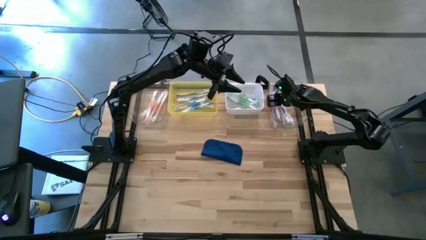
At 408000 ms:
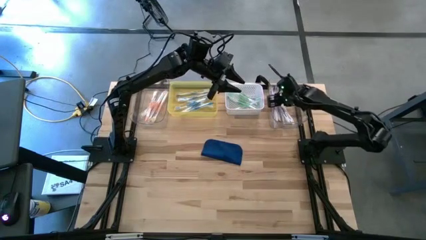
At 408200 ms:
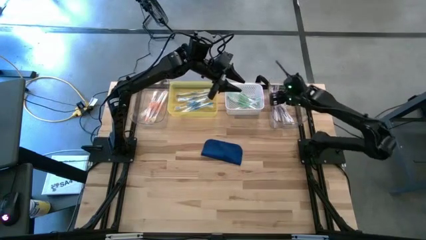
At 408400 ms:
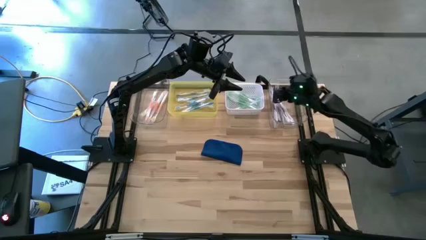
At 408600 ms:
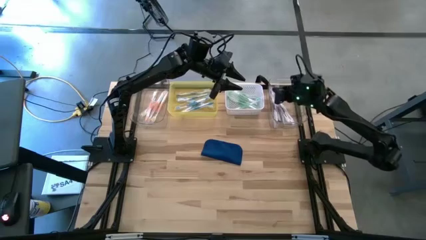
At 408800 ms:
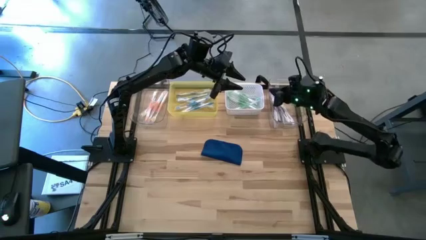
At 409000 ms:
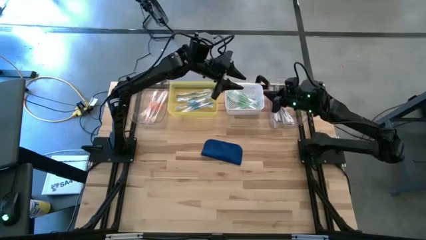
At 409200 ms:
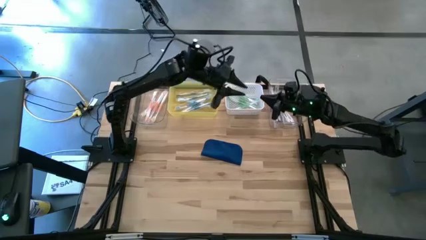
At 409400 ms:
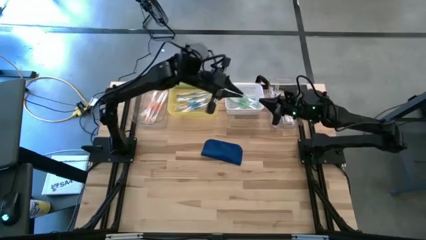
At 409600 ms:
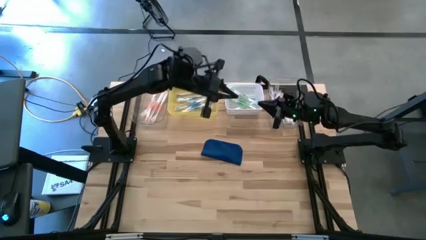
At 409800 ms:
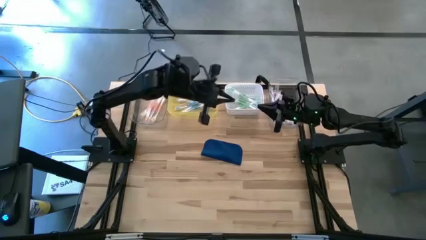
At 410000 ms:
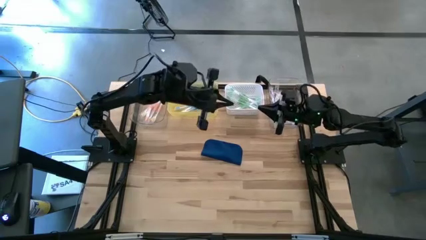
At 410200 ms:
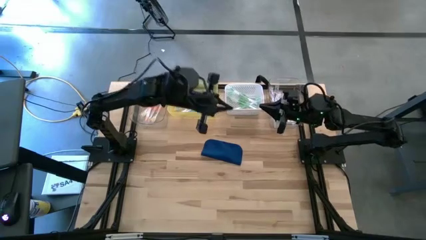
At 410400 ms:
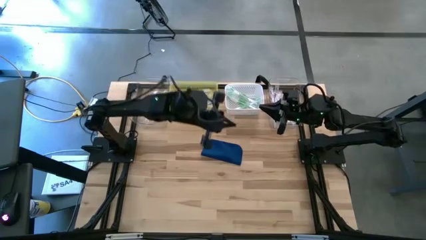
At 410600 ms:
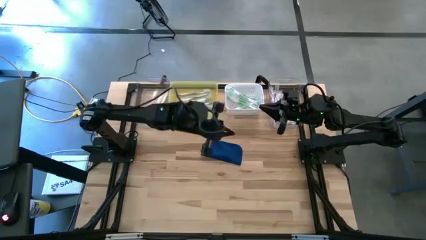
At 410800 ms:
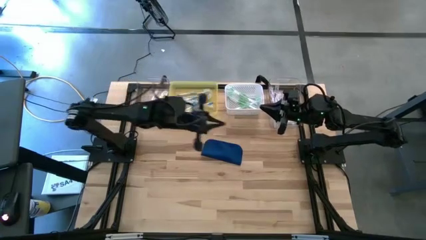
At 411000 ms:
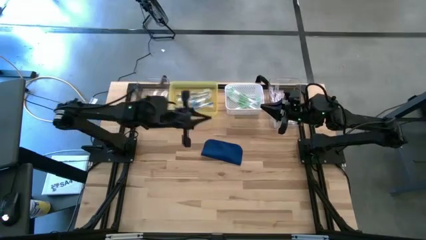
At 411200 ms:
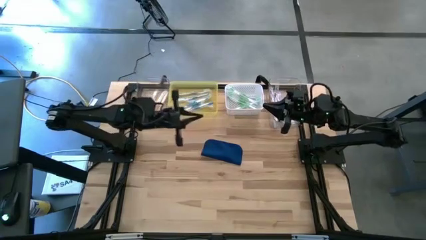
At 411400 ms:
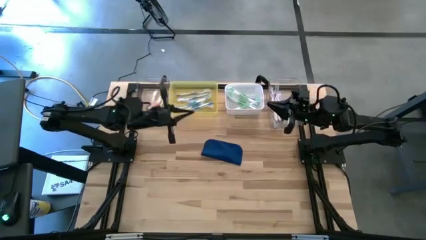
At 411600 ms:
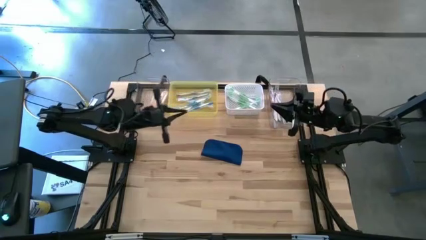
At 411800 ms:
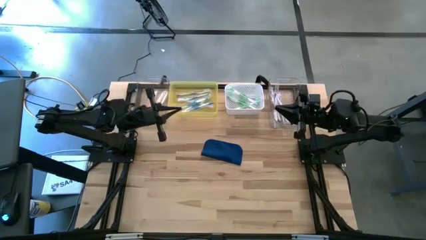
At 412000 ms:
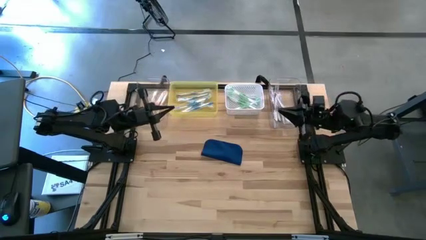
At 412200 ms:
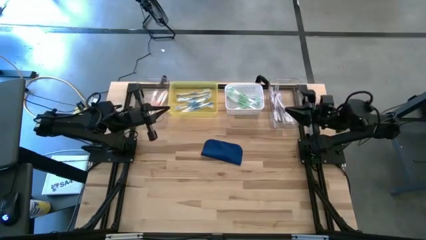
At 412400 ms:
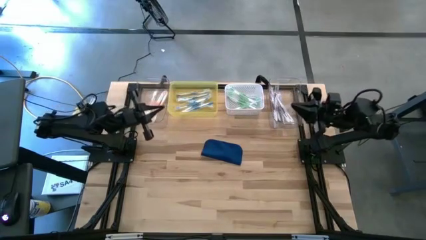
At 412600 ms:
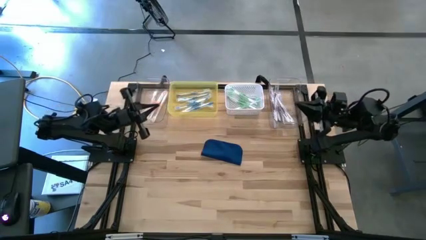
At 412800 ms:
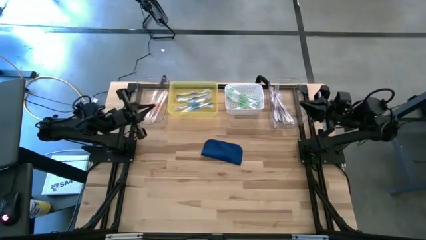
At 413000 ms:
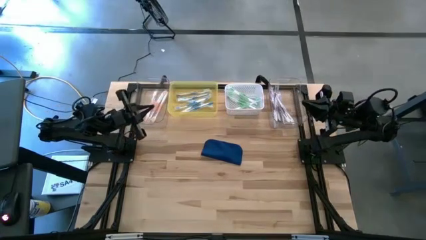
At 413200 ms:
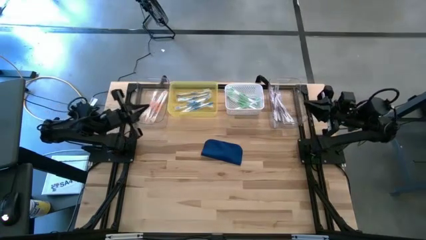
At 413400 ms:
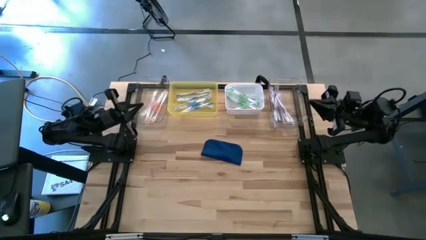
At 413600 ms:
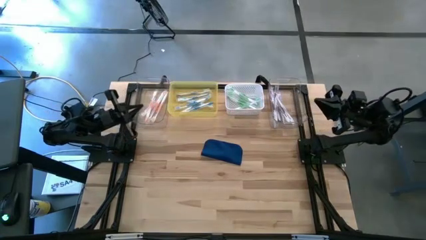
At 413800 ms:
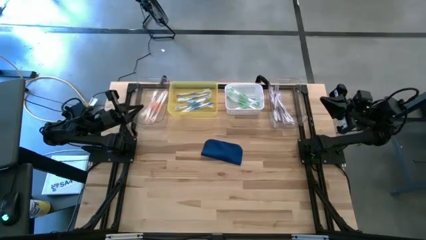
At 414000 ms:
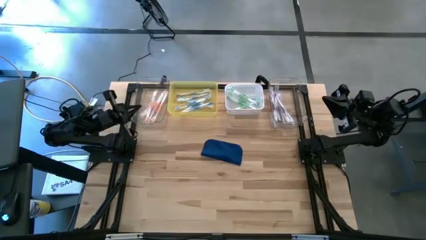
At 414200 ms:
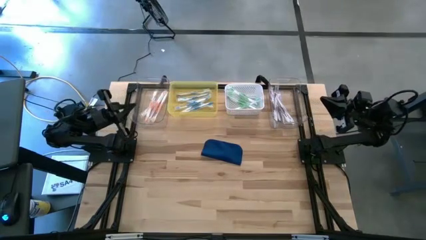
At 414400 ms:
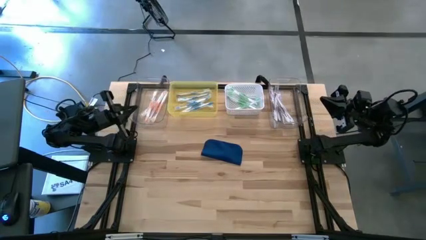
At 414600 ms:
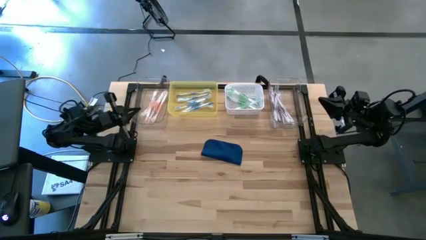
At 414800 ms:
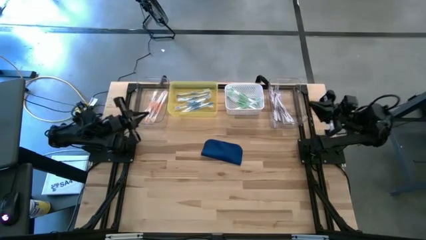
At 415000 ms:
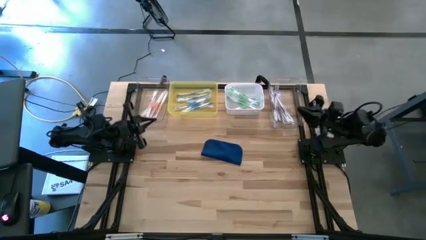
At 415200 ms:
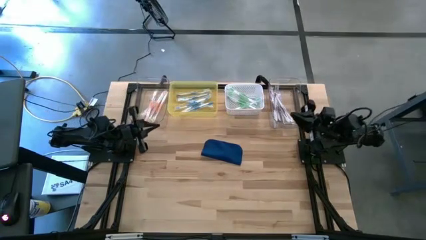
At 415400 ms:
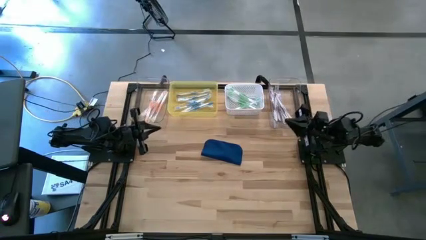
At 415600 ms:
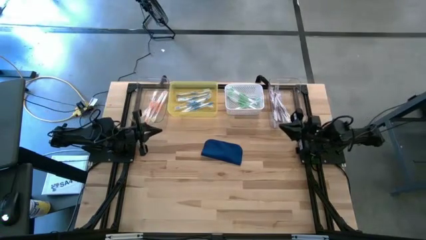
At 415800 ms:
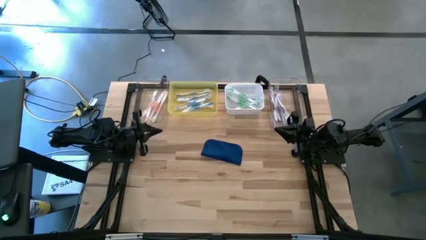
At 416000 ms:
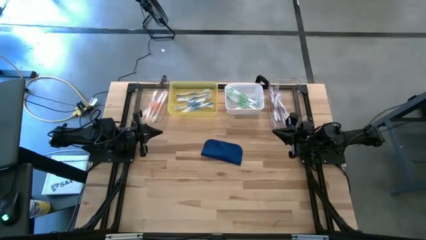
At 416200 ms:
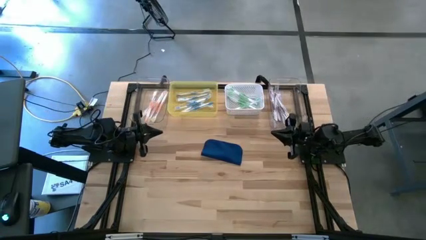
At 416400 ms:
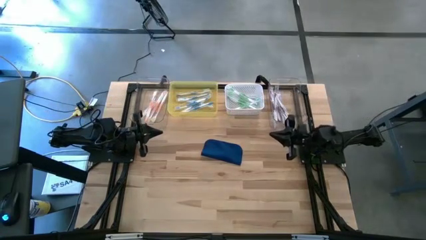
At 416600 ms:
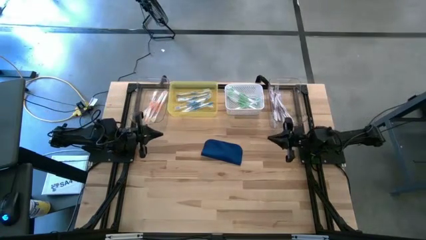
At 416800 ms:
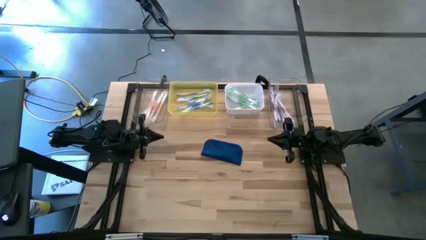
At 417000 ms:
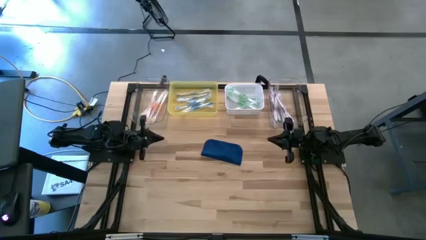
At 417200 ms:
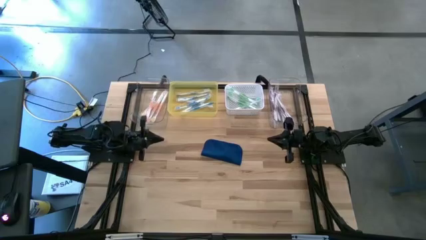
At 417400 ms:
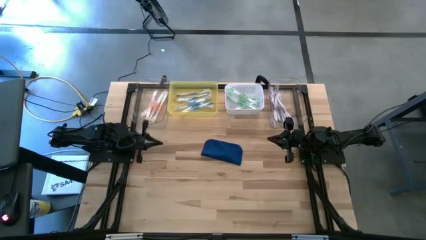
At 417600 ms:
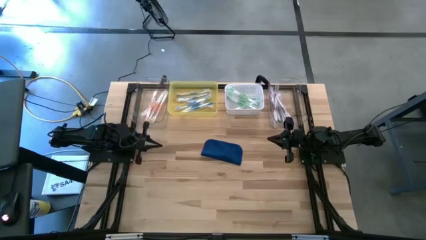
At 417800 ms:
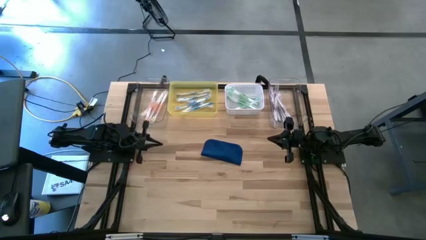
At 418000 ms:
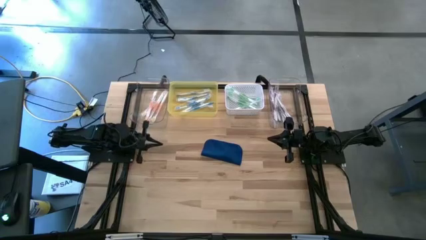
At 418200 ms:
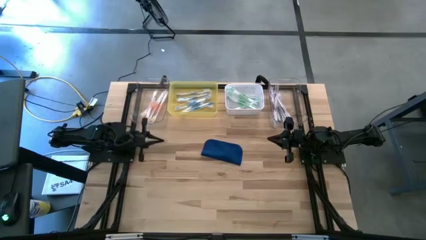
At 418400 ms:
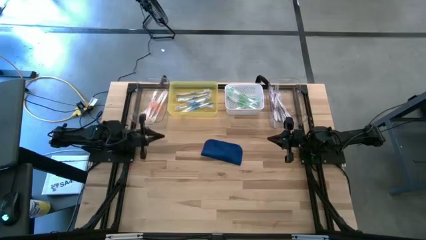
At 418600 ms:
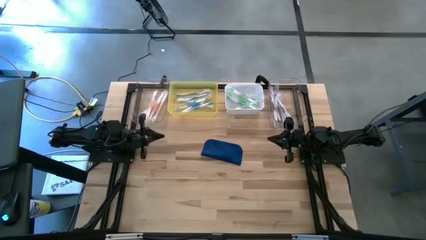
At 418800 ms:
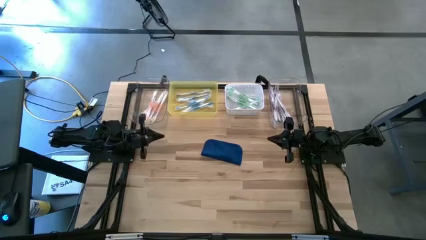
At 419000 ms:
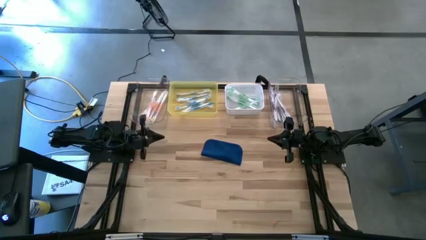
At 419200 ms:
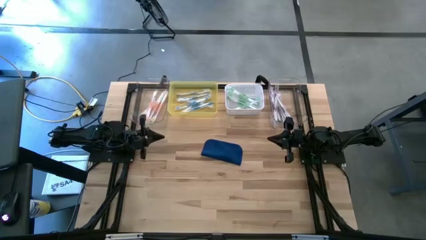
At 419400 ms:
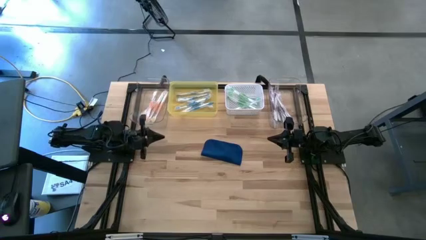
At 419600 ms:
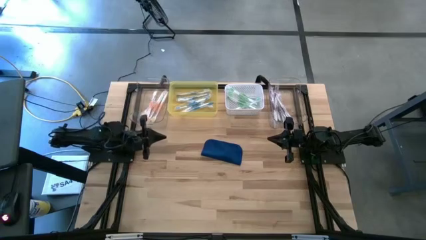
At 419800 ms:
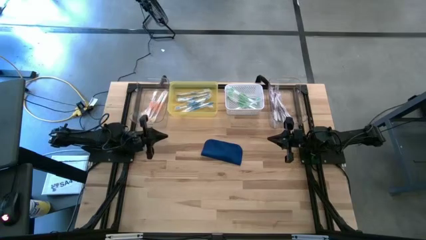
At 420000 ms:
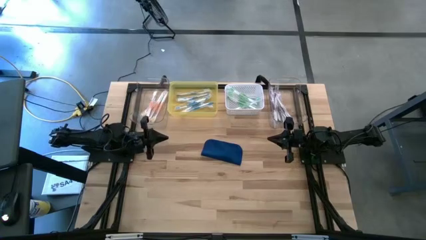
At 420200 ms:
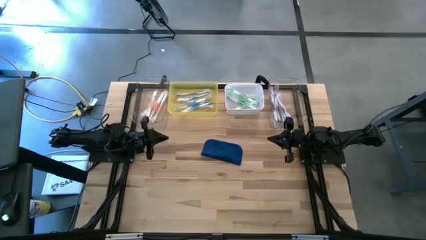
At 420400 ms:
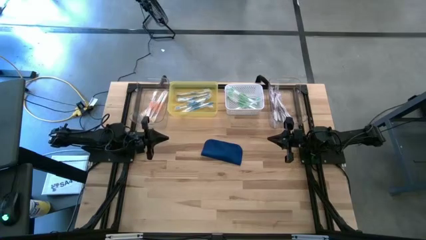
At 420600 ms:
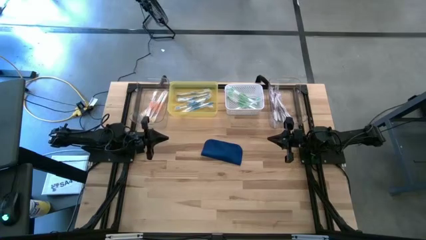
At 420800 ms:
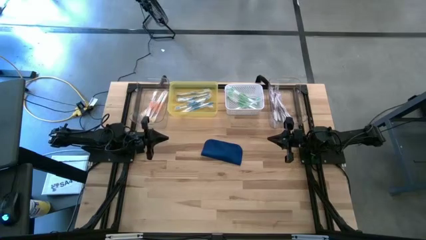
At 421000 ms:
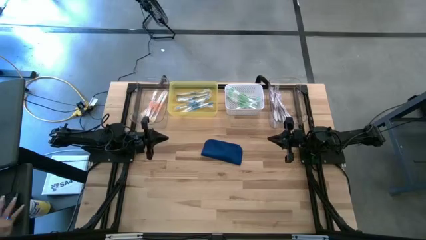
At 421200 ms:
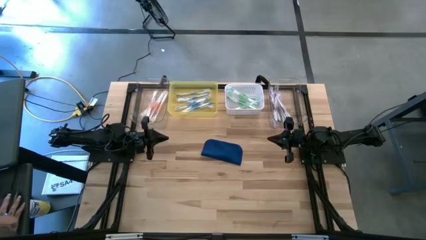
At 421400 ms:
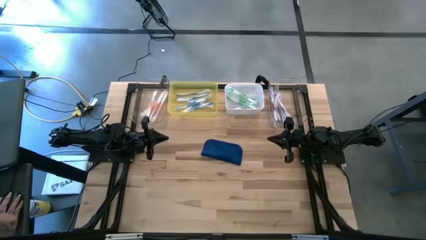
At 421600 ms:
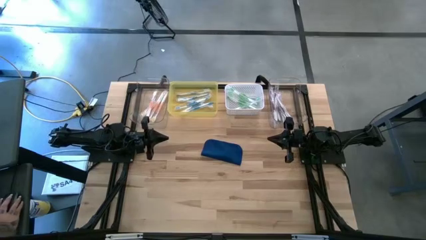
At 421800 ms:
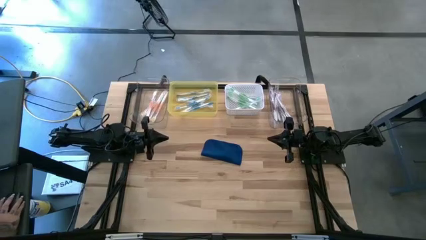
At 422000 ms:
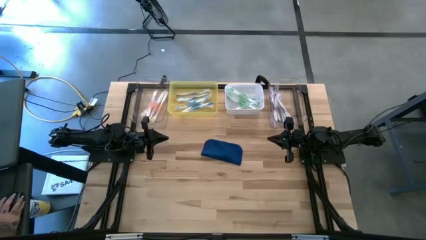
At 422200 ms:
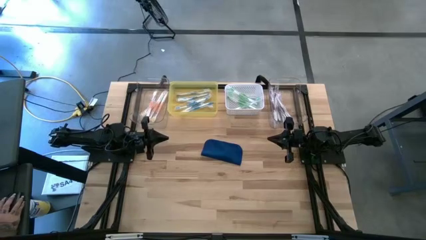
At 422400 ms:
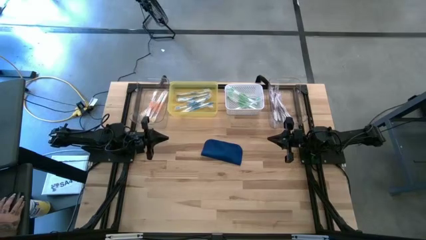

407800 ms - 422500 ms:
Task: Pick & Place Toothbrushes
Return to Home Position

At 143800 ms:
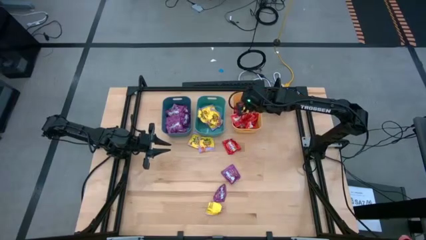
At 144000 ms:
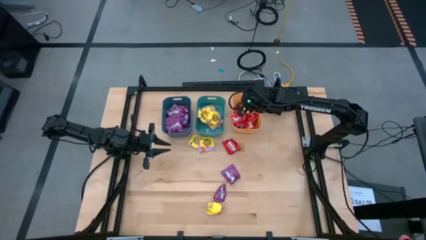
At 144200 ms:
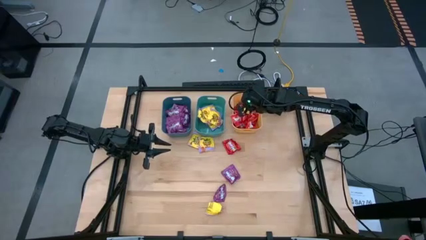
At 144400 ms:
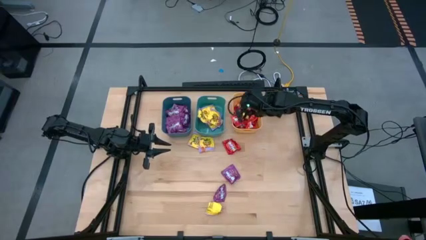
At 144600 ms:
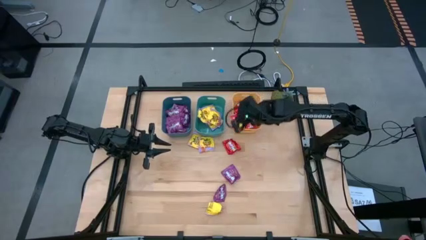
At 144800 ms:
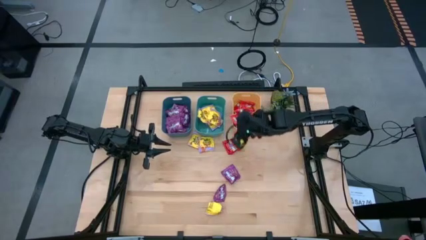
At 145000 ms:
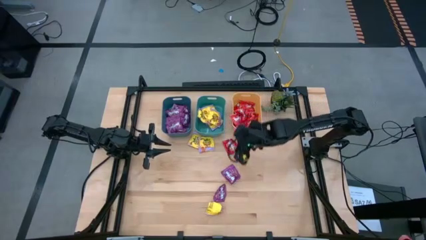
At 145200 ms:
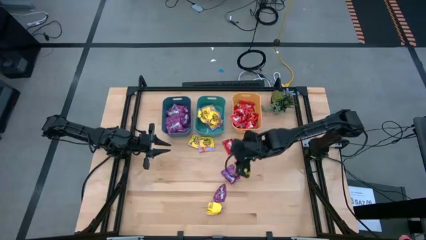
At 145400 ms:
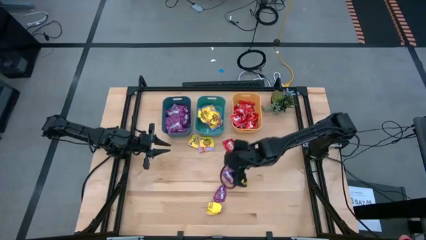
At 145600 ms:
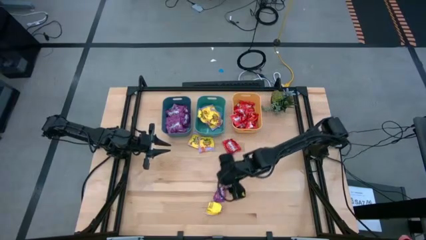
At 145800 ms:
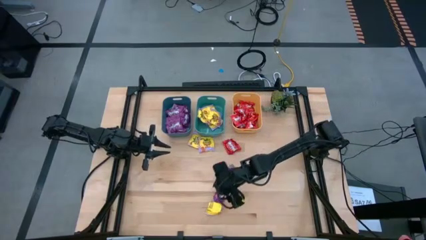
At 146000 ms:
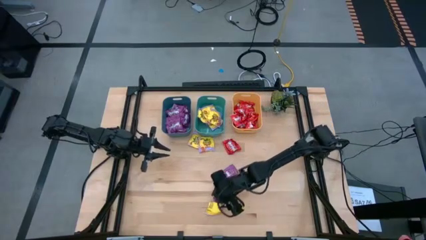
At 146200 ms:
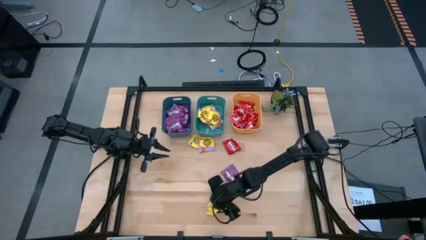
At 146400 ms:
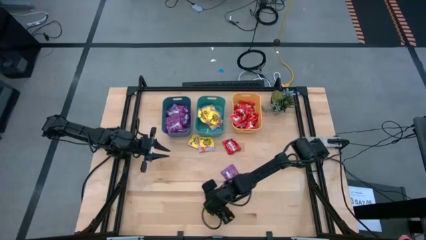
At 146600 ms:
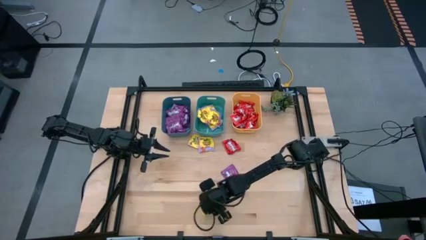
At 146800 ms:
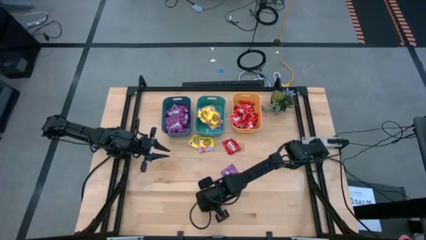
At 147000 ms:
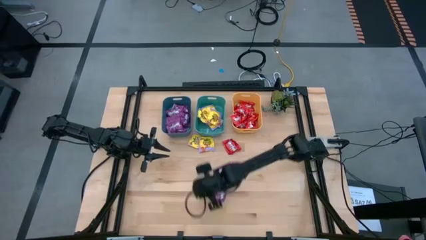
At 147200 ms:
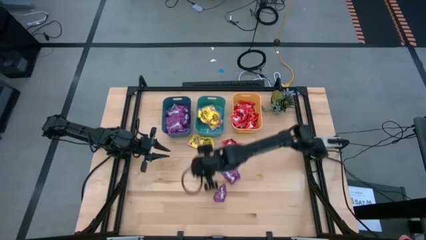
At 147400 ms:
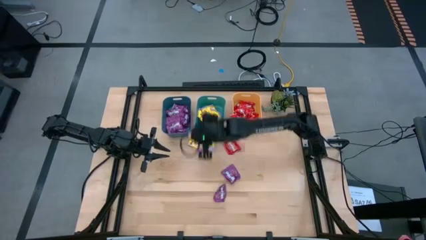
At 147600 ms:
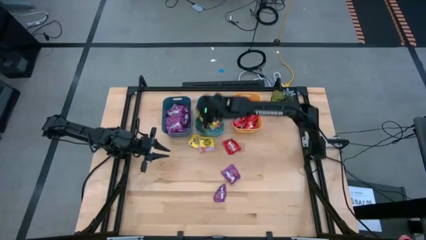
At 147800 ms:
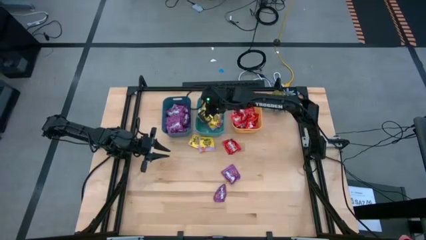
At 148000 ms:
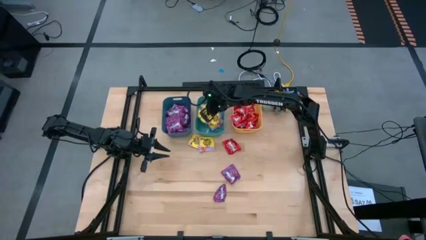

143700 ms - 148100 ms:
Task: Sort candy
Put the yellow candy into the green bin
